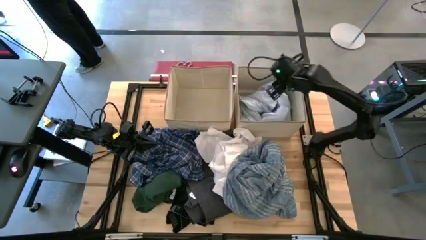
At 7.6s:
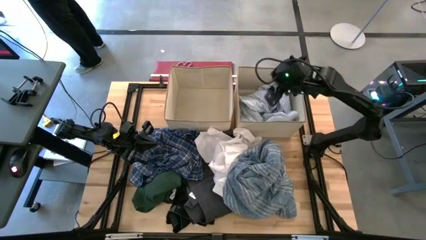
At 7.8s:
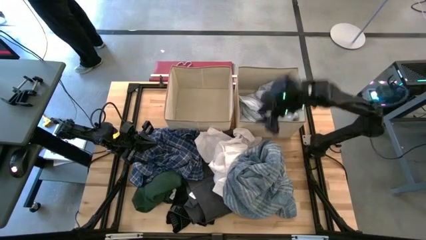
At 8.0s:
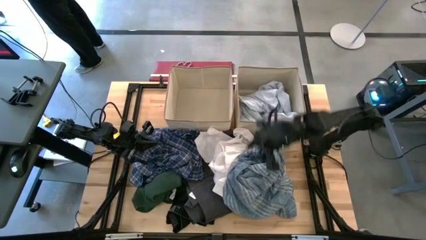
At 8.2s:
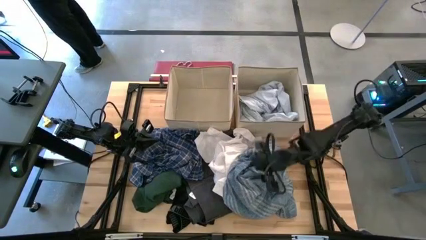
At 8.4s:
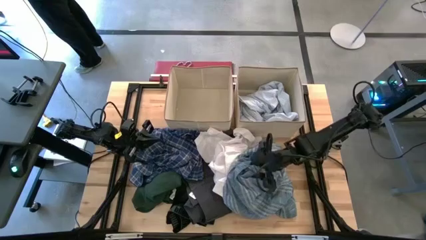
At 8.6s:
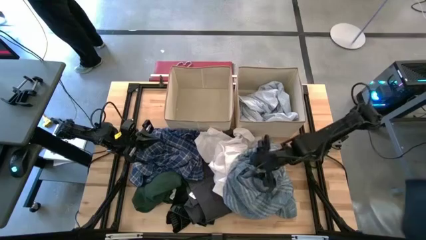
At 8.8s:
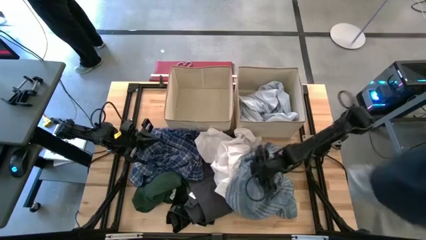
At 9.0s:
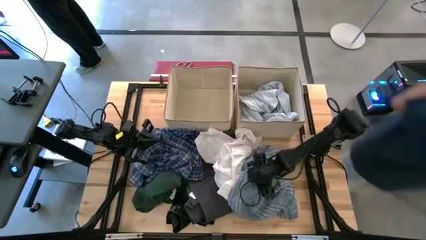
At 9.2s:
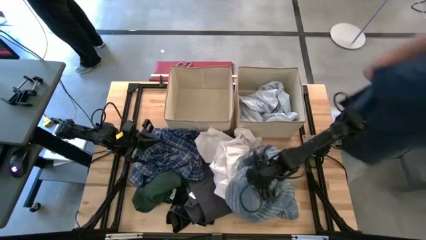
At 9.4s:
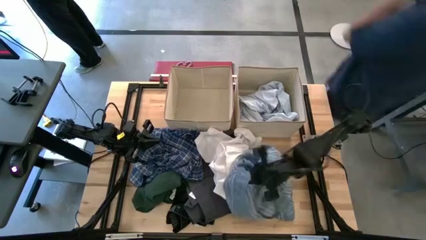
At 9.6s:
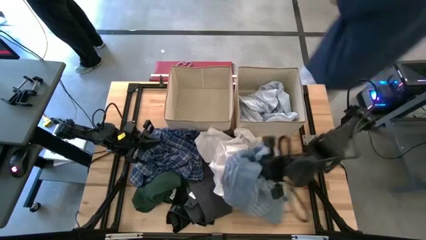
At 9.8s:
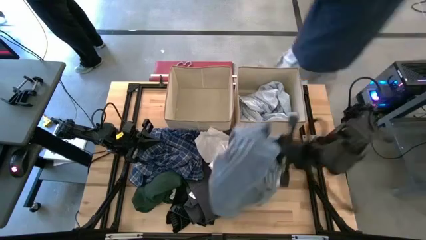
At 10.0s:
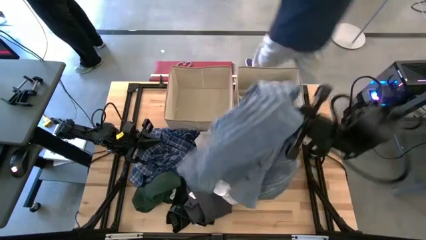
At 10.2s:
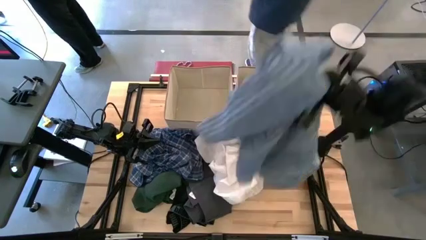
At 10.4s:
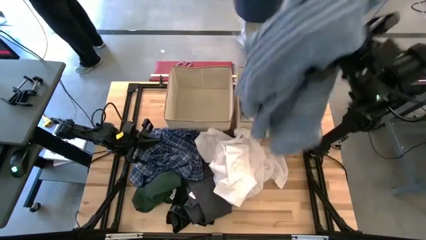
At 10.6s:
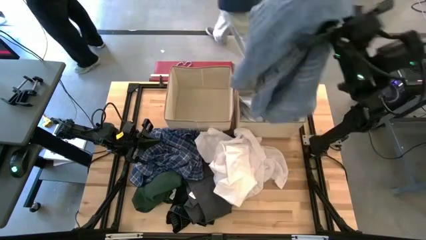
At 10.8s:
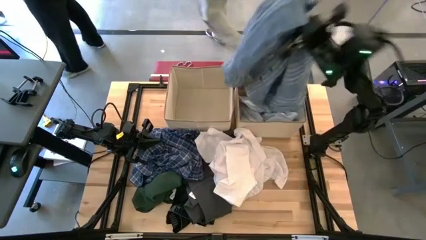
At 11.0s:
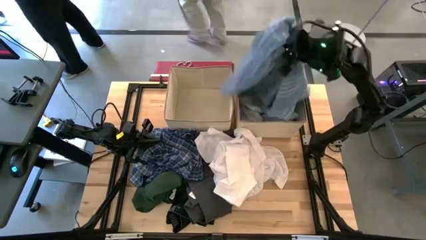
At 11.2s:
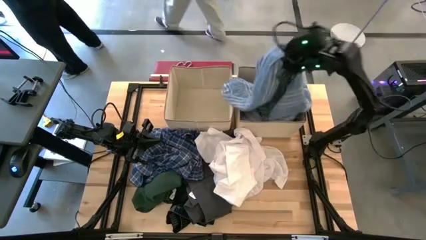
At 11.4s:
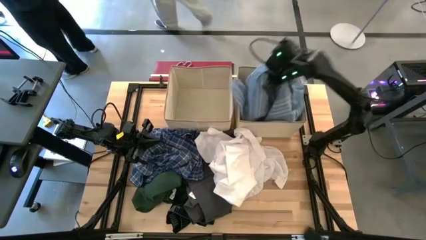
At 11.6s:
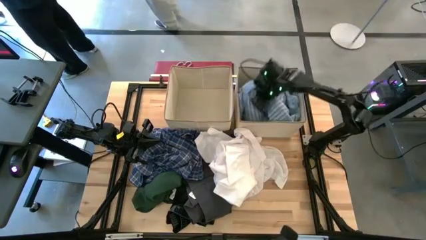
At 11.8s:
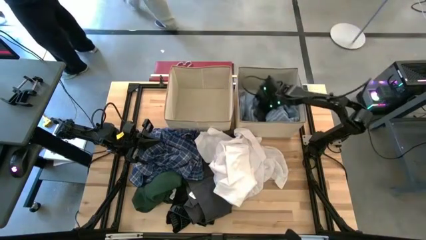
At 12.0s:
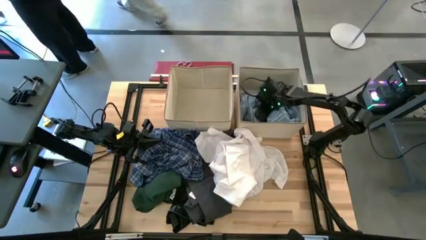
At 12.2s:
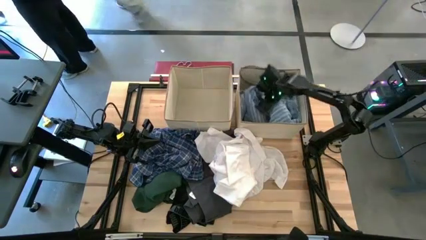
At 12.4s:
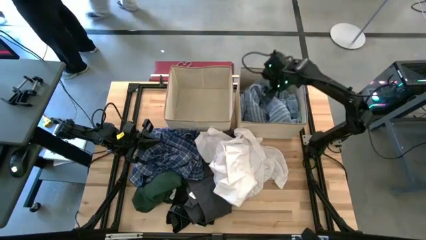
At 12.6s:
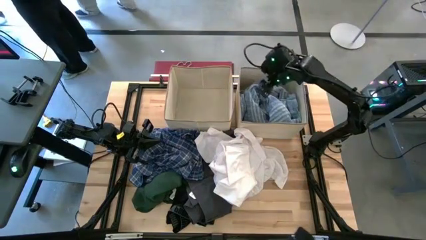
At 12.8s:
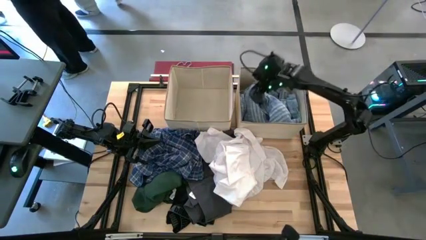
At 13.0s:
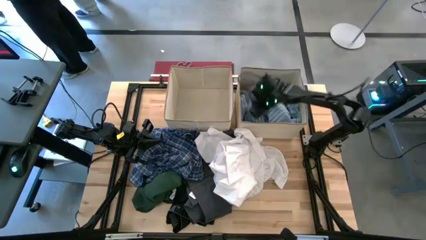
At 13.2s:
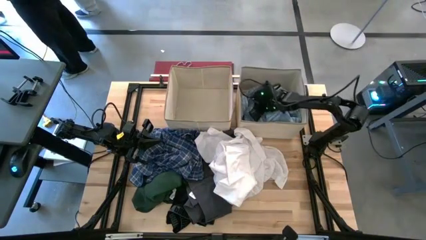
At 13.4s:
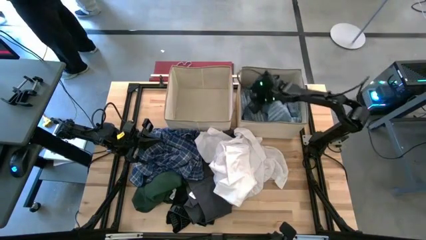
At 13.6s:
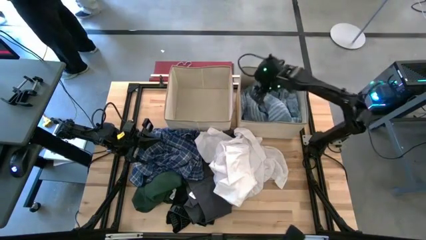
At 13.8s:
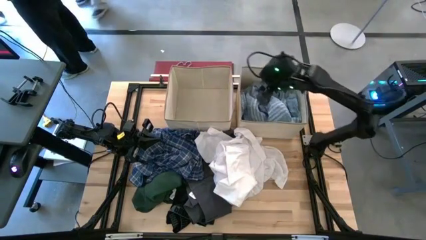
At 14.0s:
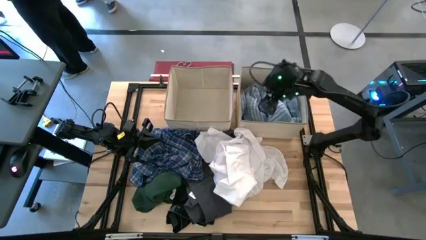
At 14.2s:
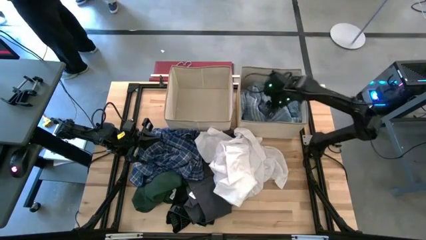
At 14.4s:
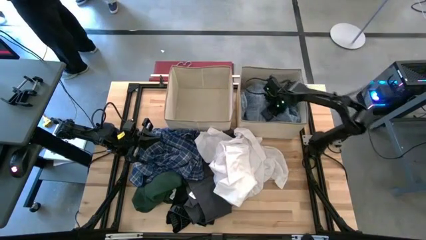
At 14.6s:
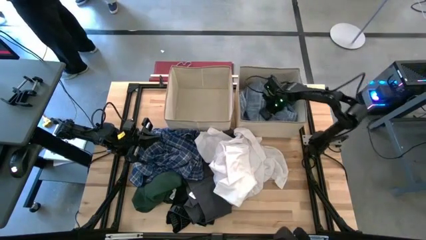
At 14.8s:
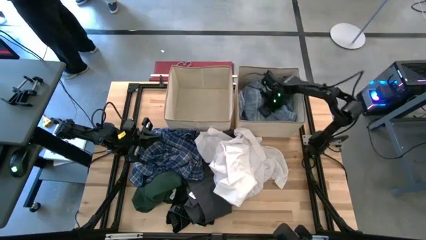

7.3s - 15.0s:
Task: Sort clothes
Put the blue stripe long sleeve shirt into the right brown bin

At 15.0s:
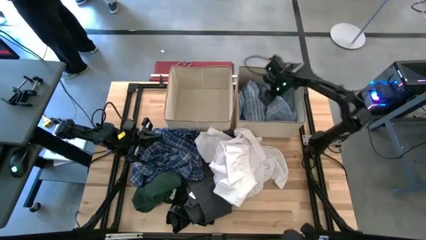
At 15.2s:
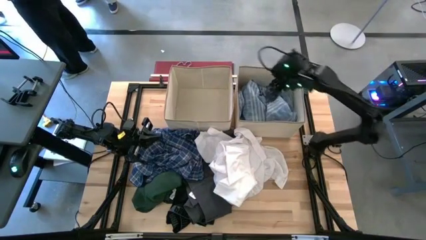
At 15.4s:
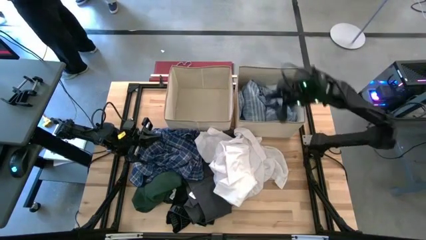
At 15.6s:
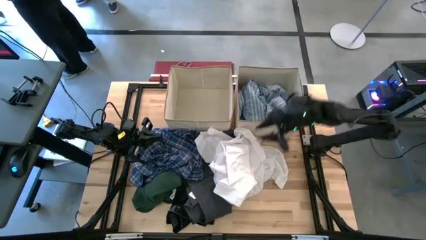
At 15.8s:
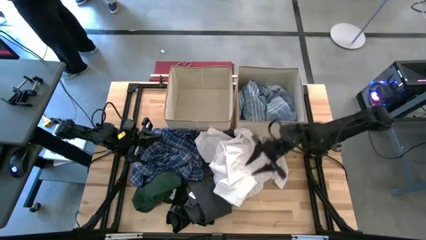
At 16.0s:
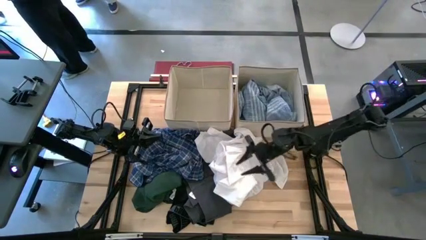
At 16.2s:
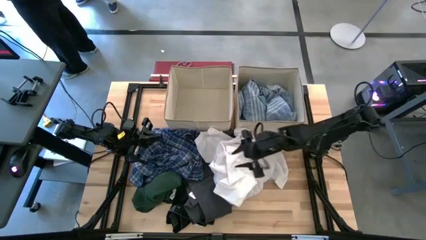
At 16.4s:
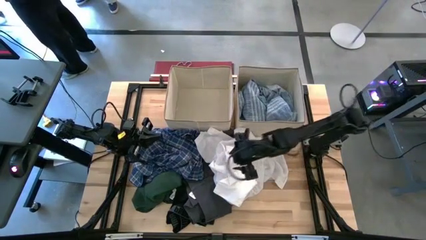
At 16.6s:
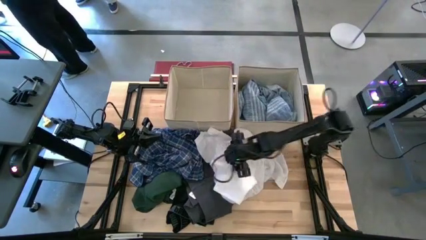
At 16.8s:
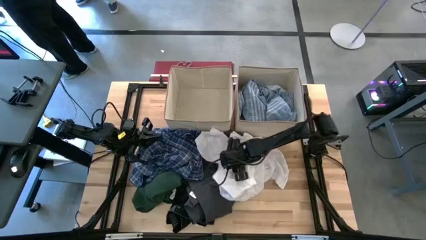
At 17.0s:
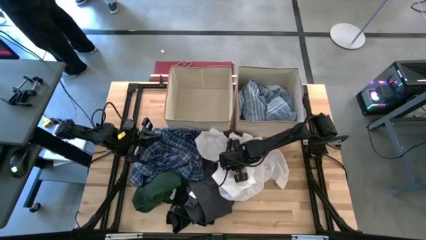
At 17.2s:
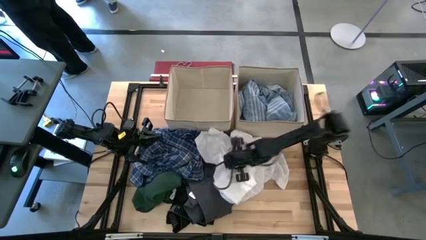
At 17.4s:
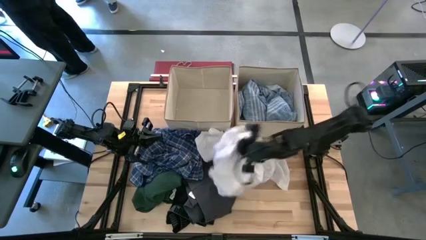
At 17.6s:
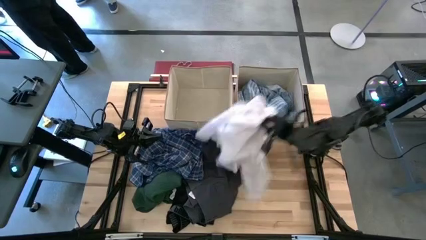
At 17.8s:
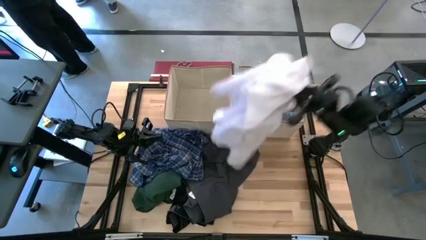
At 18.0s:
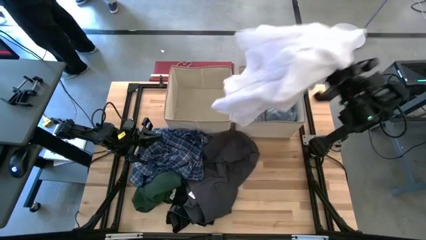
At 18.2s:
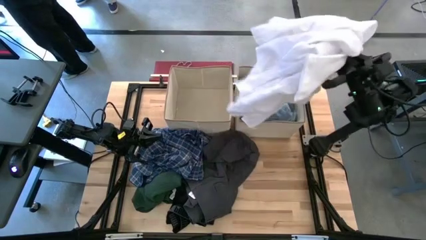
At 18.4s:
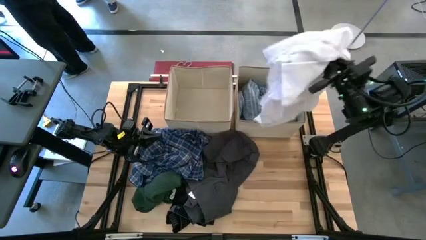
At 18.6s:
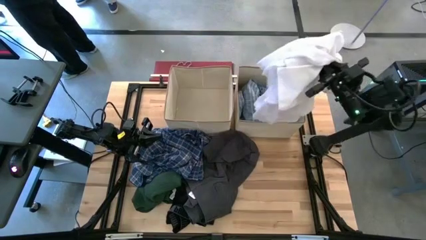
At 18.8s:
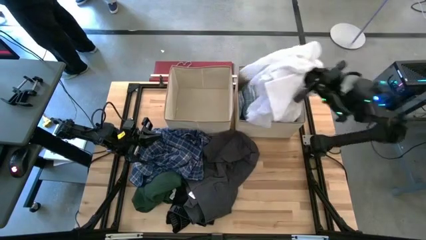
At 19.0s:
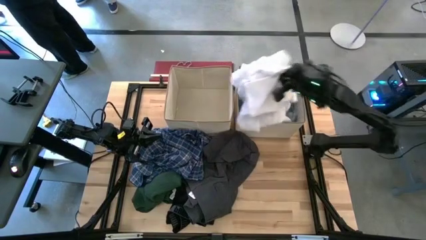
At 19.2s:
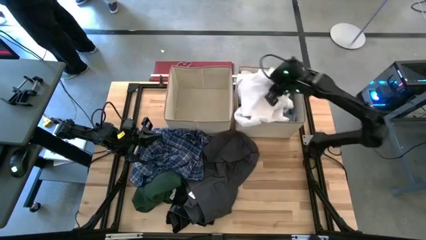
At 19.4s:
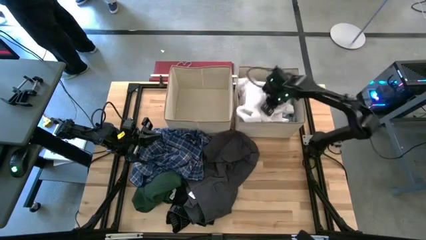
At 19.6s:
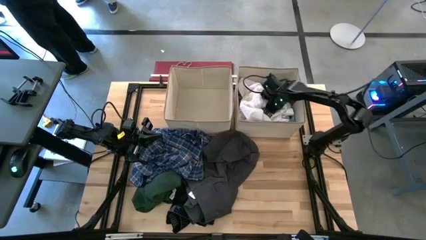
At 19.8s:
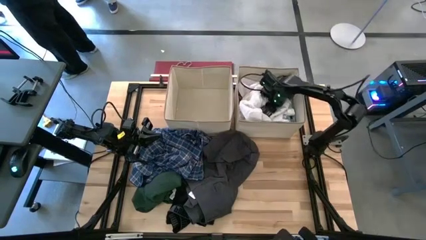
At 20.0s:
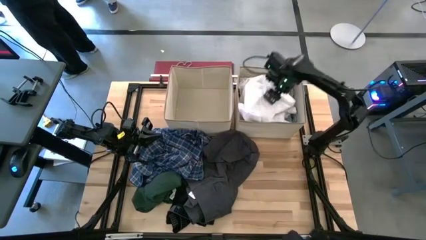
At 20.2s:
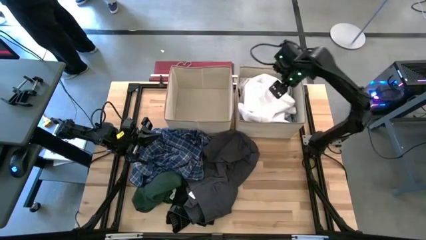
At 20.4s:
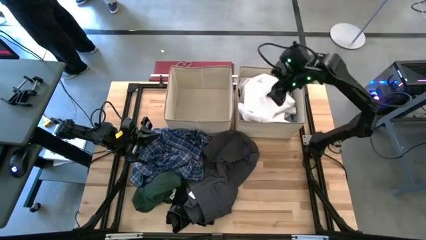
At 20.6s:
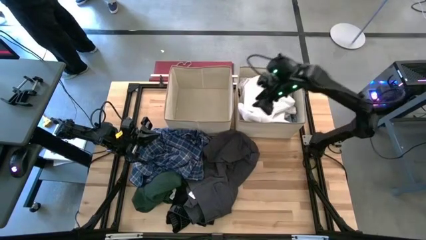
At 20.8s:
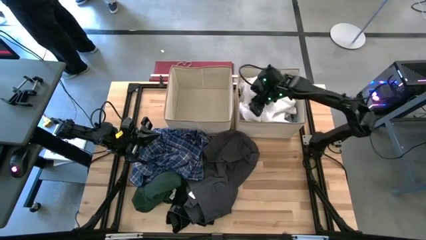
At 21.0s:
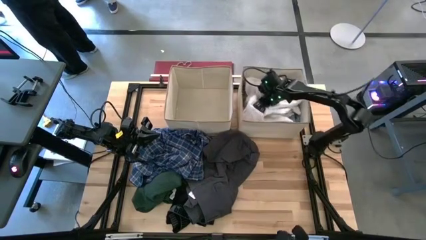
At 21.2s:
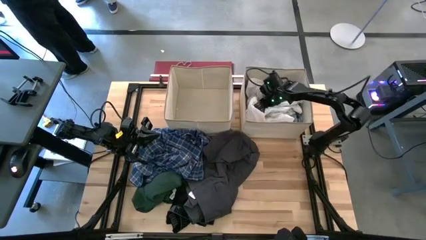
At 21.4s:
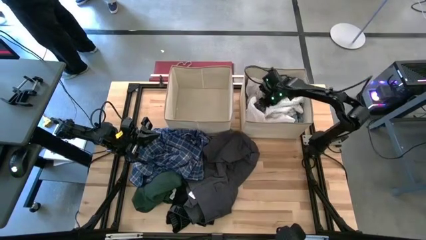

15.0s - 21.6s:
Put the white shirt into the right brown bin

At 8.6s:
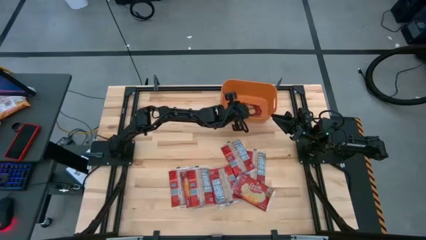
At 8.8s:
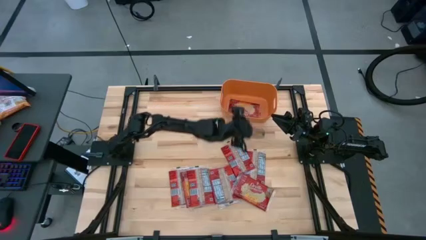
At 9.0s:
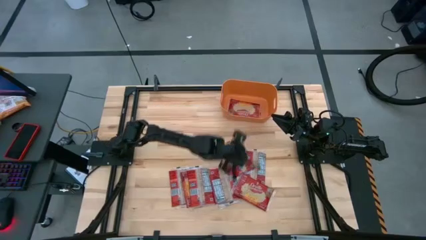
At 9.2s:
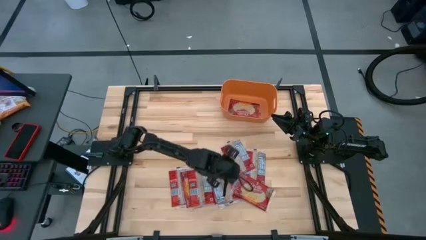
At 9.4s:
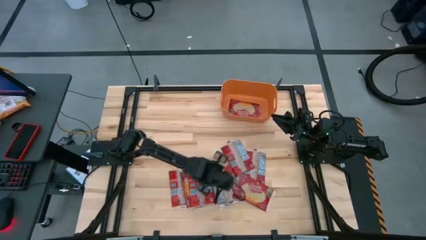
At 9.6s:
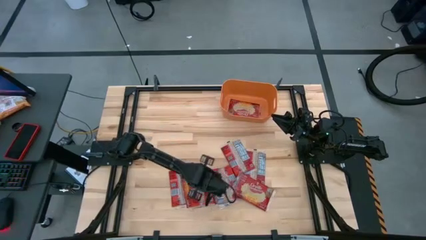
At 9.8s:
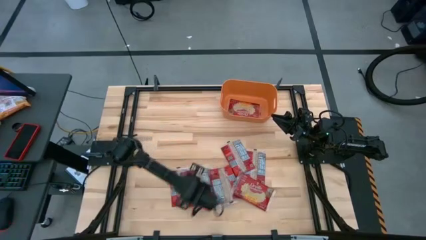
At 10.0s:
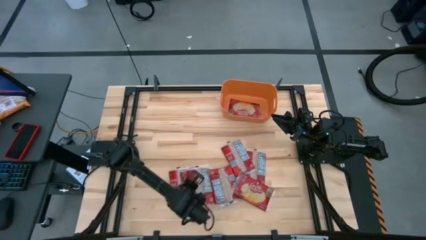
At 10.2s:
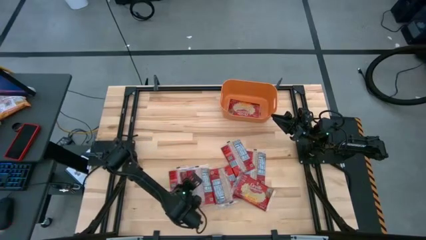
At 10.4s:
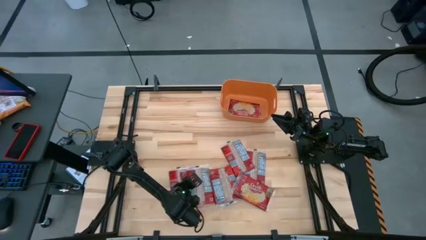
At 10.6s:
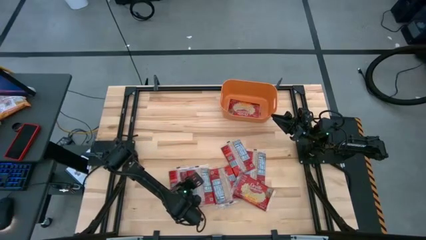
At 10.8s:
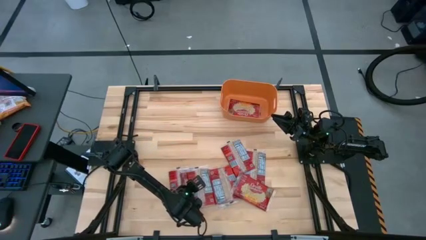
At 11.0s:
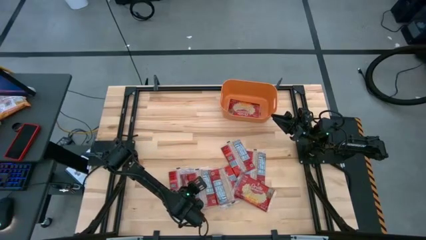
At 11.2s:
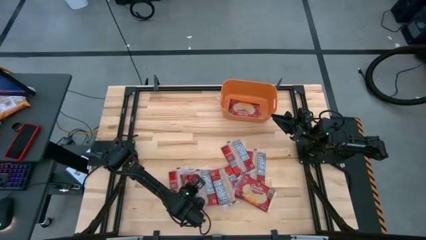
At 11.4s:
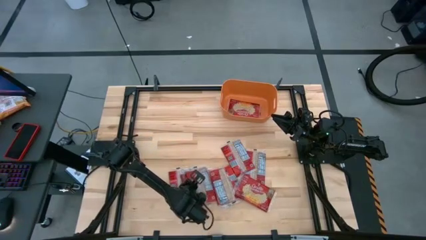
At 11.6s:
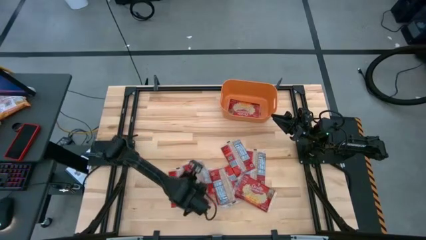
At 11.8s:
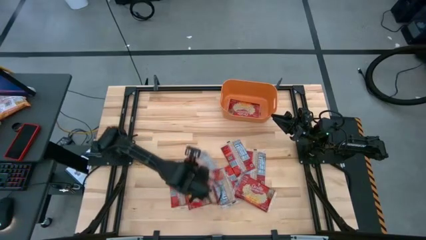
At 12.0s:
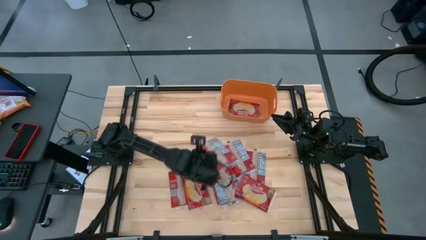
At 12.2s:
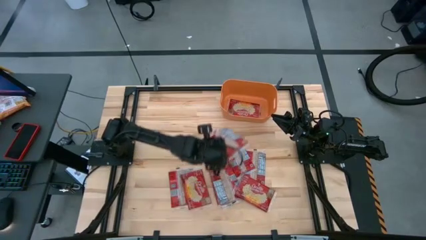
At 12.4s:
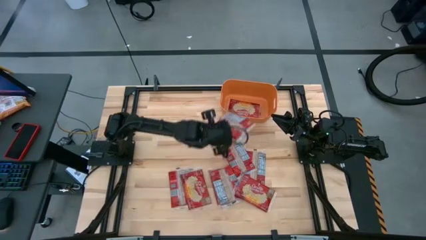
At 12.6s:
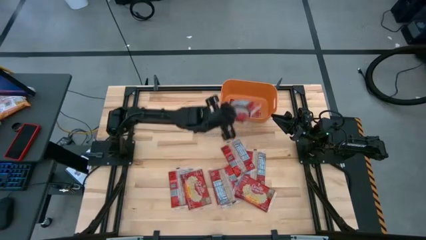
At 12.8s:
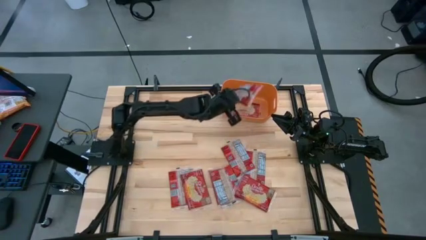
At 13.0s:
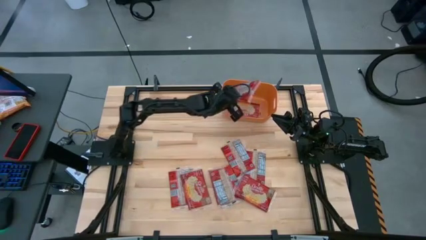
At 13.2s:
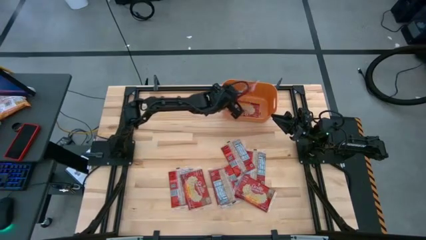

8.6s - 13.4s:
Task: Sort popcorn bags into baskets
Put the red popcorn bag into the orange bin
